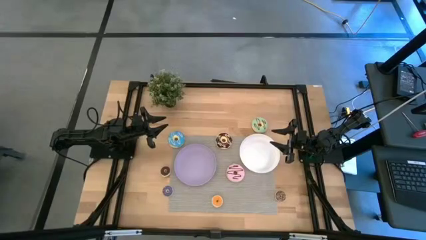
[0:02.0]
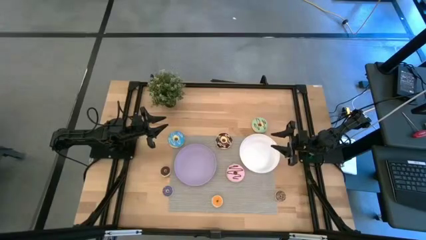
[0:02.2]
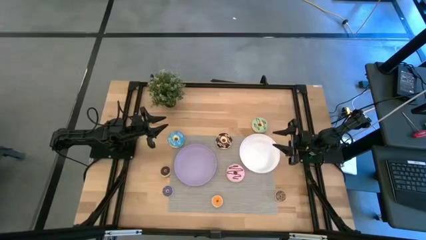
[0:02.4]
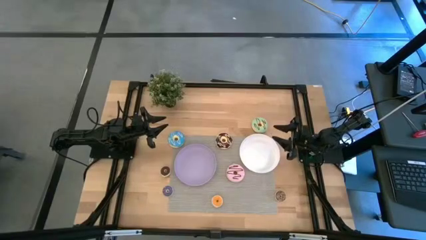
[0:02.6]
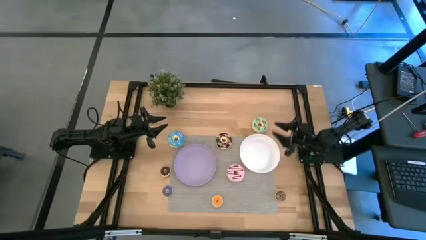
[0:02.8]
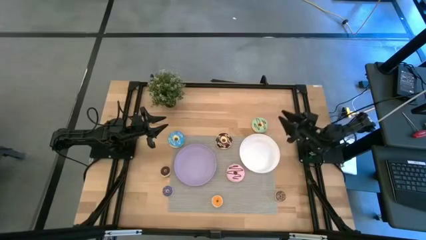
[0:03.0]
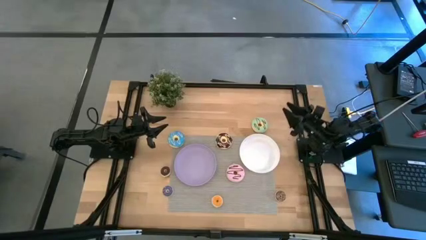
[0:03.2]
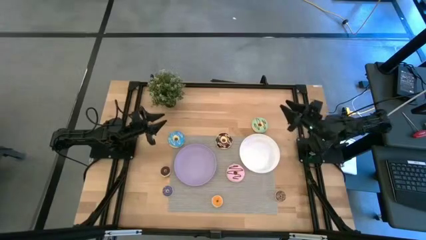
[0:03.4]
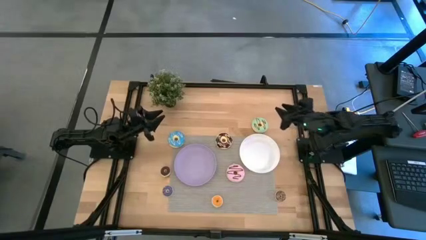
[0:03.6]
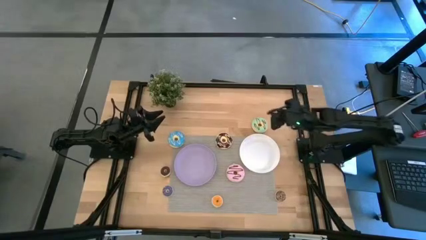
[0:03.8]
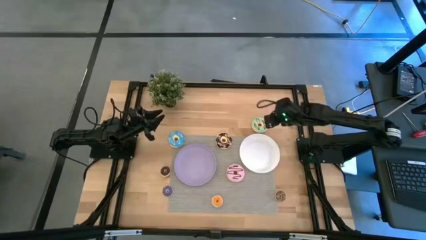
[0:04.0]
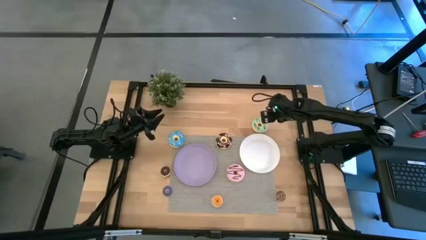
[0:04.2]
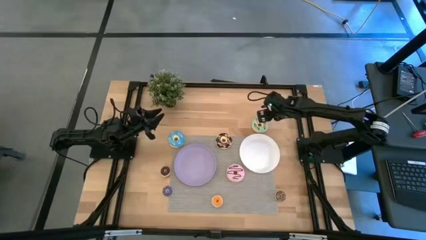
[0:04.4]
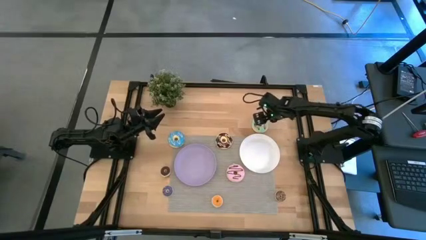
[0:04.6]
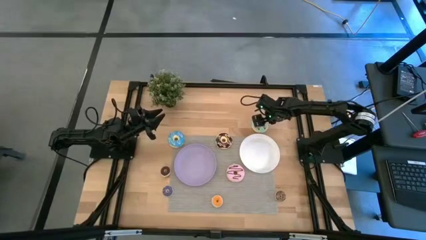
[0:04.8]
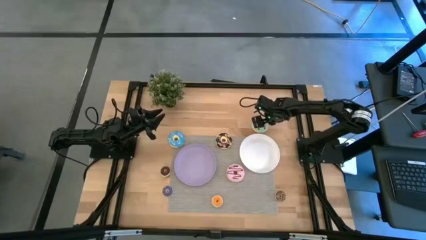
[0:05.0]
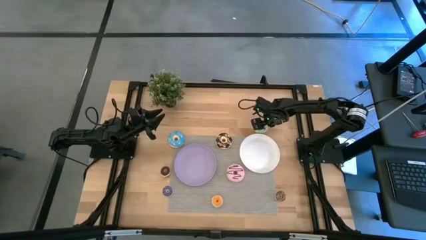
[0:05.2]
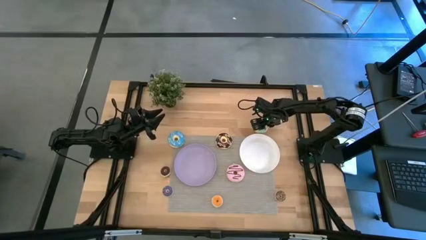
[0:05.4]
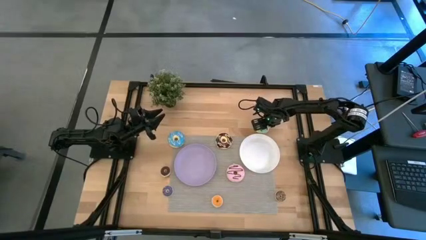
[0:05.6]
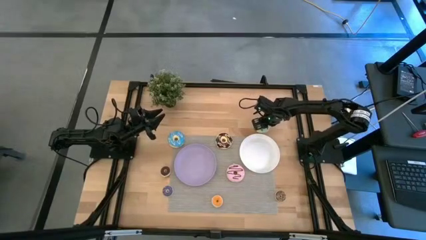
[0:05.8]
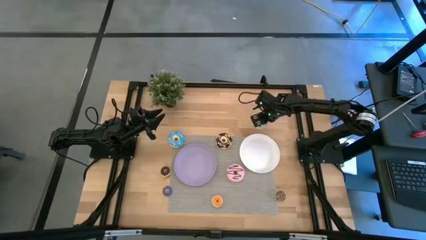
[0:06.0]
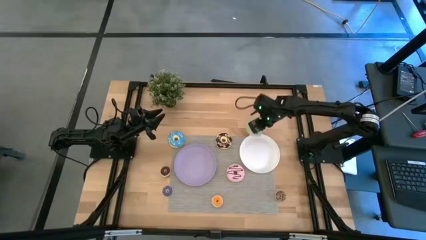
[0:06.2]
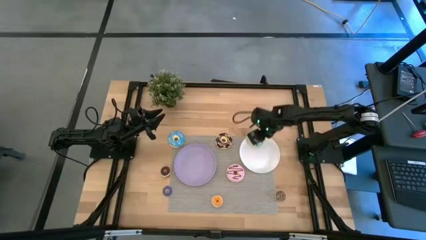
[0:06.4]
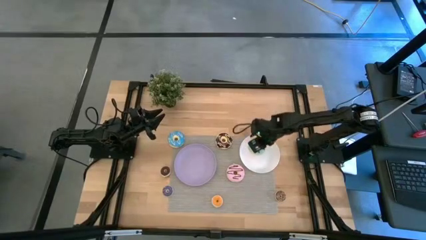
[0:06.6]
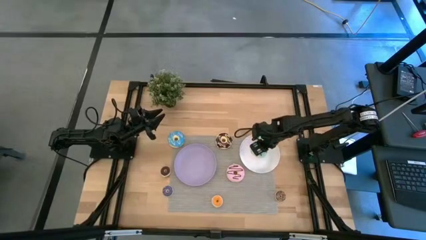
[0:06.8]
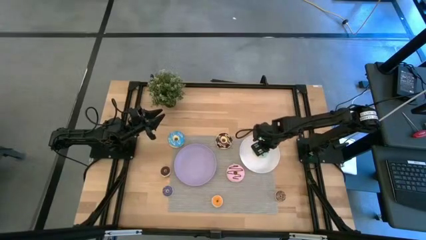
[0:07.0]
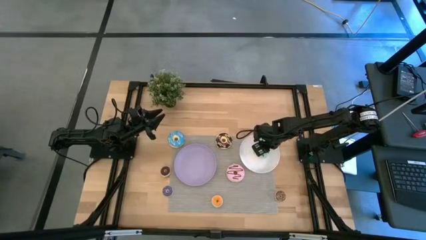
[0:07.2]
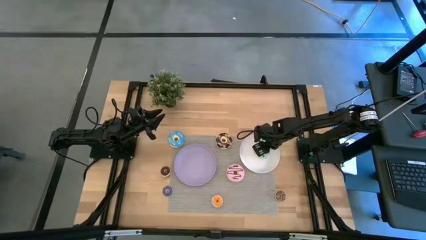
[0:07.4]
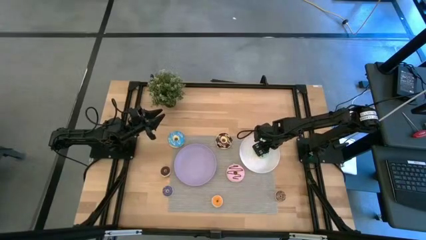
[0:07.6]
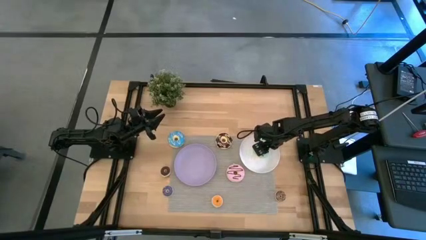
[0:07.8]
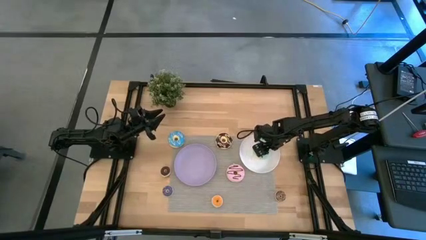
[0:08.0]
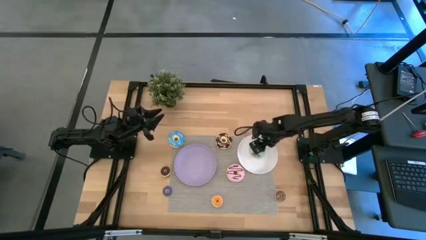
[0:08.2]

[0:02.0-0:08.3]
Task: Pick & Place donuts
Put the large green donut on the white plate

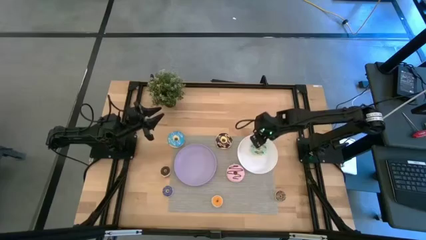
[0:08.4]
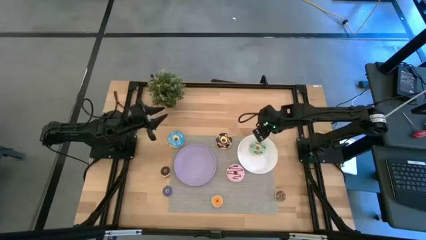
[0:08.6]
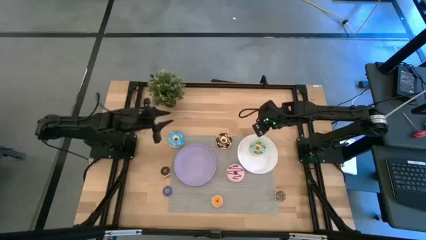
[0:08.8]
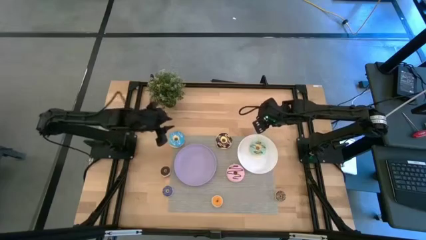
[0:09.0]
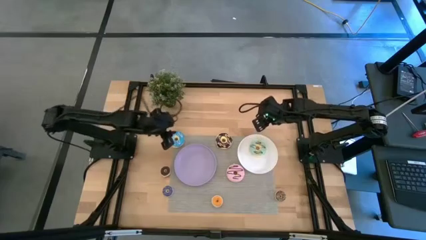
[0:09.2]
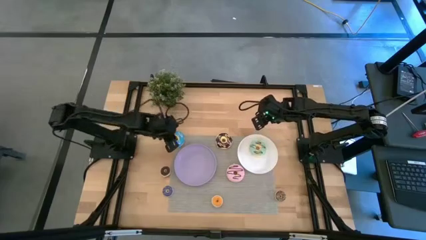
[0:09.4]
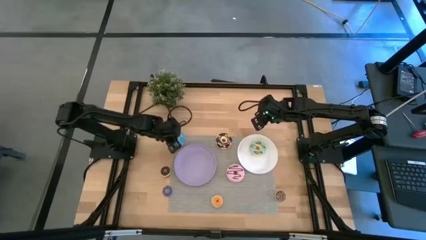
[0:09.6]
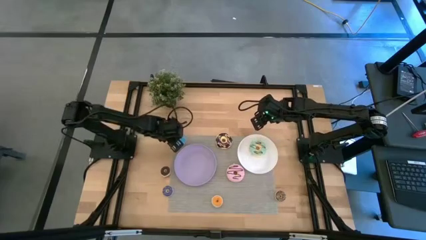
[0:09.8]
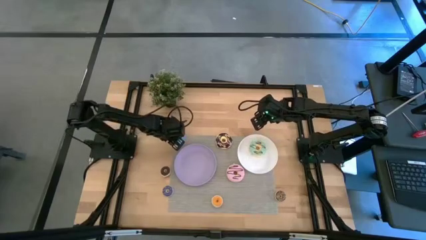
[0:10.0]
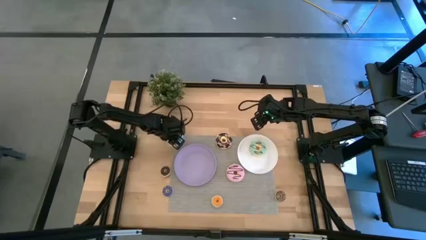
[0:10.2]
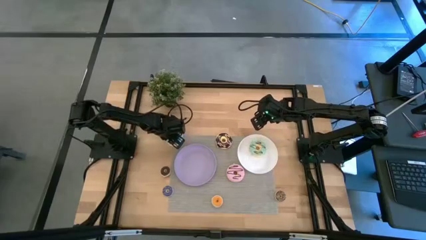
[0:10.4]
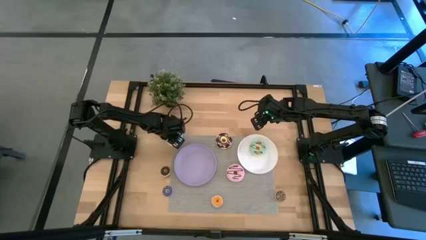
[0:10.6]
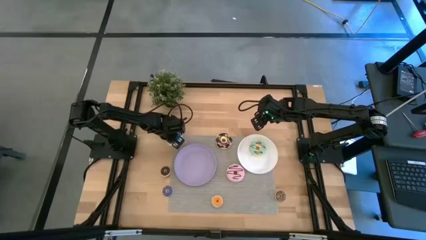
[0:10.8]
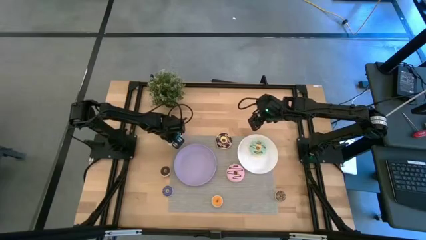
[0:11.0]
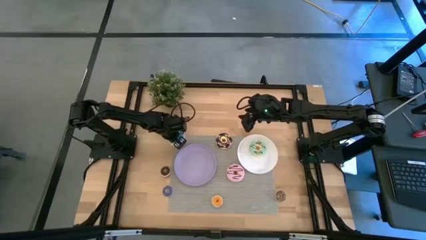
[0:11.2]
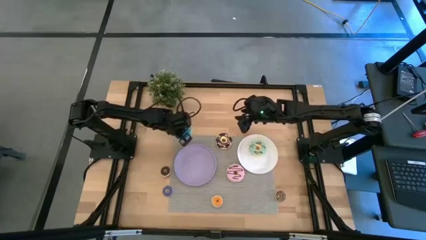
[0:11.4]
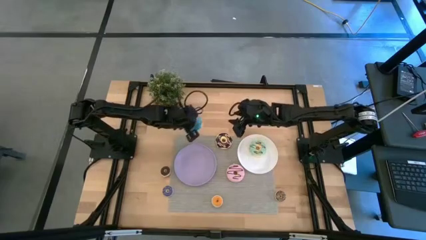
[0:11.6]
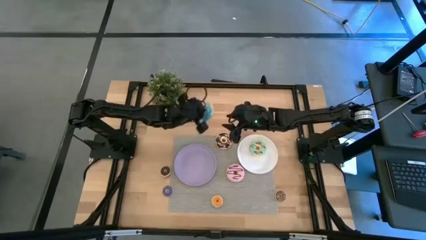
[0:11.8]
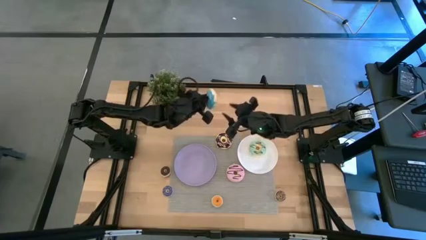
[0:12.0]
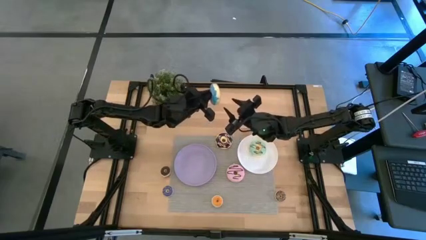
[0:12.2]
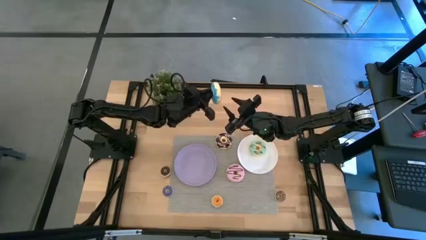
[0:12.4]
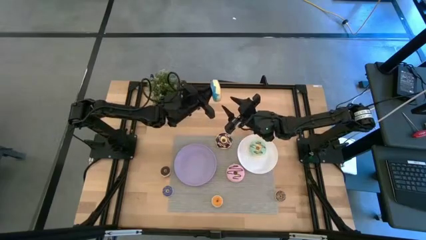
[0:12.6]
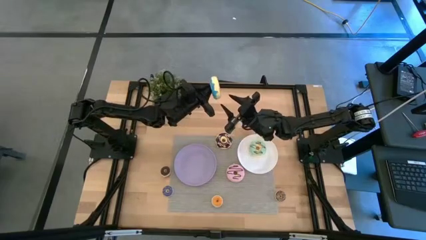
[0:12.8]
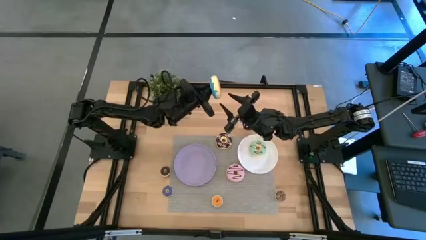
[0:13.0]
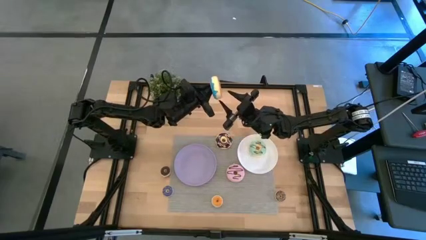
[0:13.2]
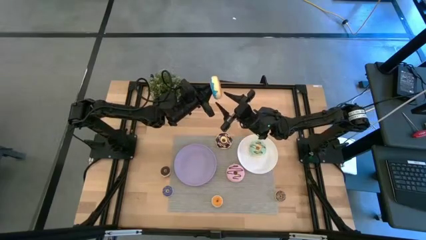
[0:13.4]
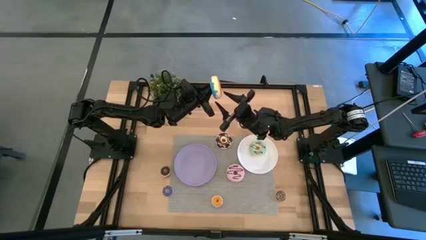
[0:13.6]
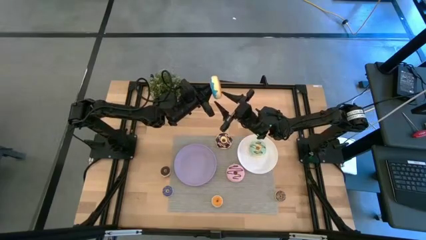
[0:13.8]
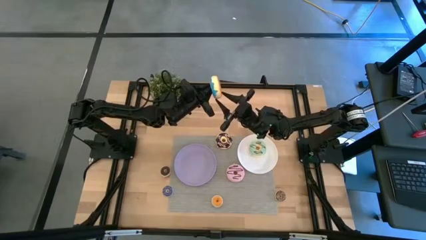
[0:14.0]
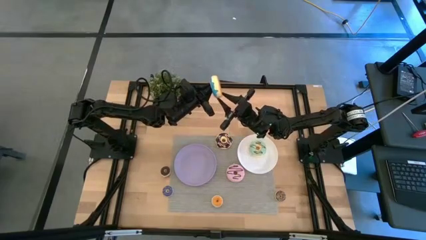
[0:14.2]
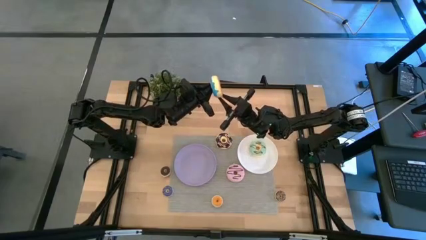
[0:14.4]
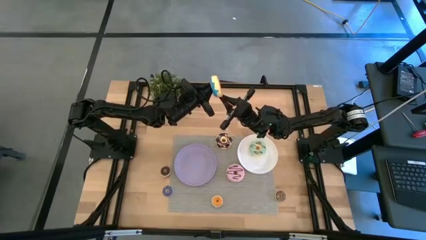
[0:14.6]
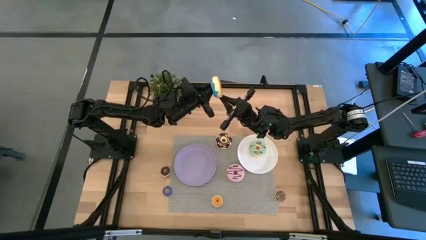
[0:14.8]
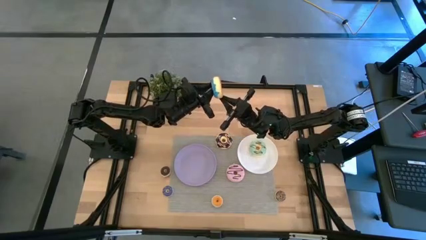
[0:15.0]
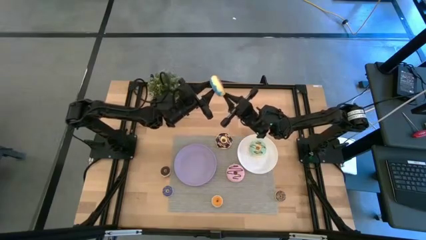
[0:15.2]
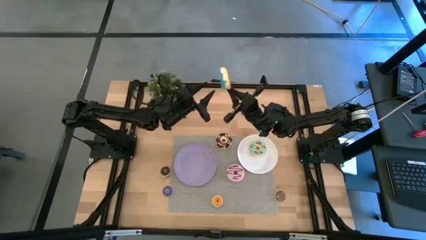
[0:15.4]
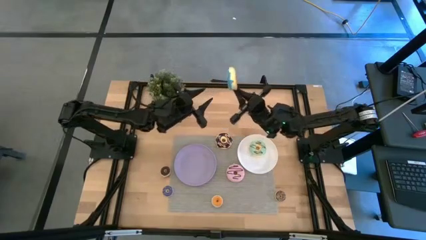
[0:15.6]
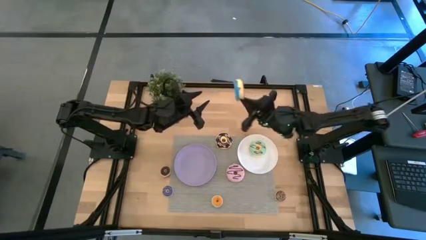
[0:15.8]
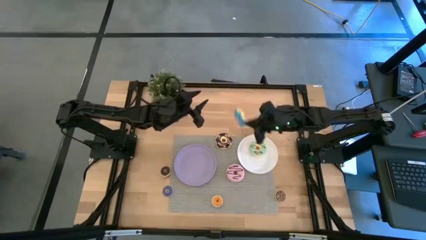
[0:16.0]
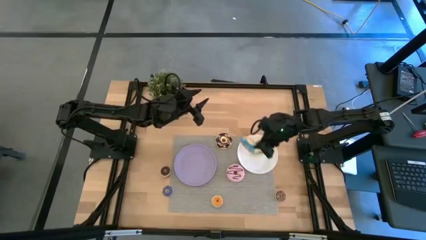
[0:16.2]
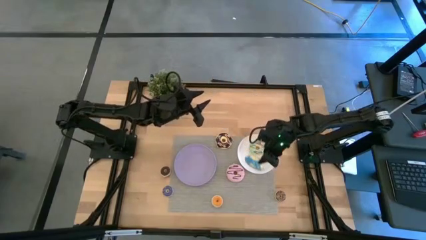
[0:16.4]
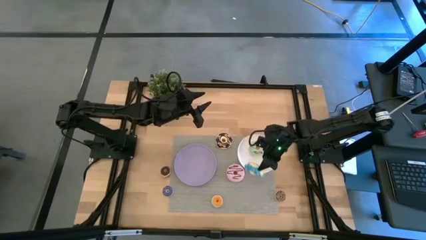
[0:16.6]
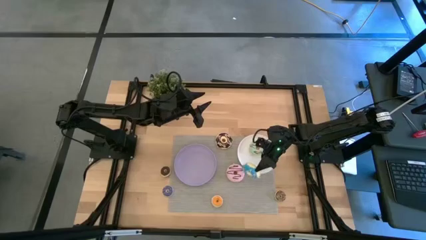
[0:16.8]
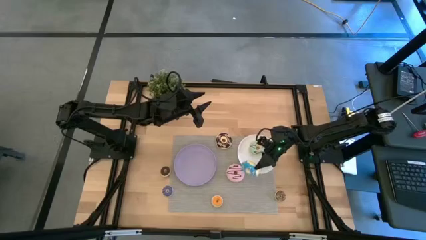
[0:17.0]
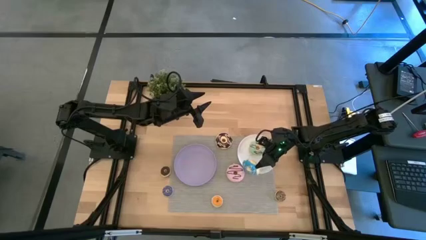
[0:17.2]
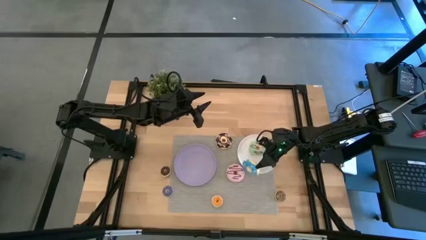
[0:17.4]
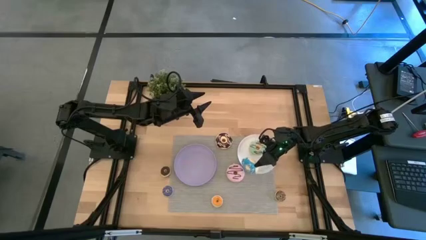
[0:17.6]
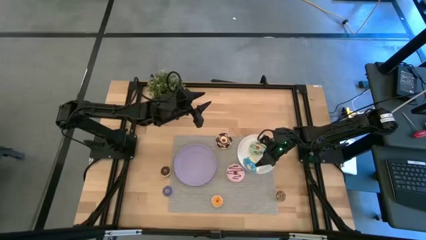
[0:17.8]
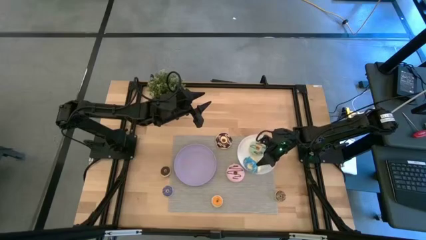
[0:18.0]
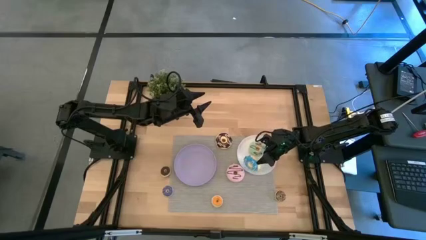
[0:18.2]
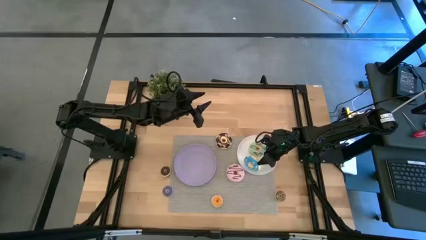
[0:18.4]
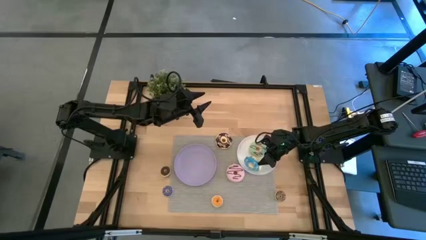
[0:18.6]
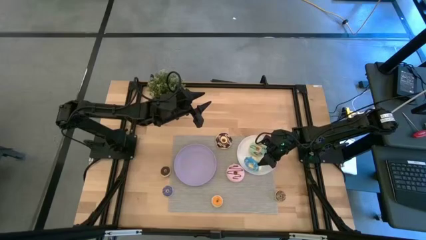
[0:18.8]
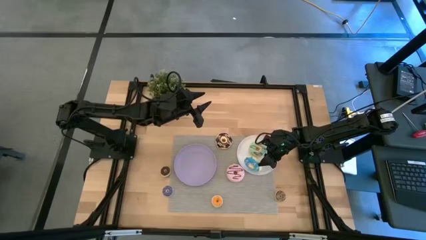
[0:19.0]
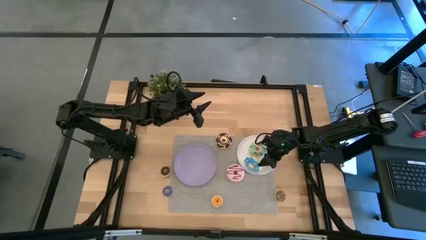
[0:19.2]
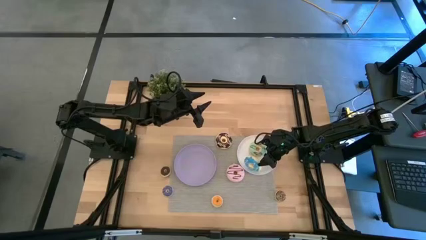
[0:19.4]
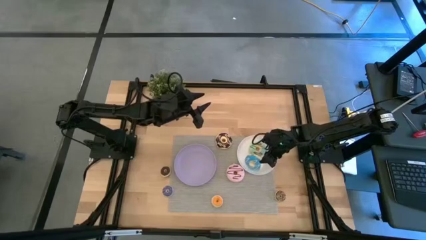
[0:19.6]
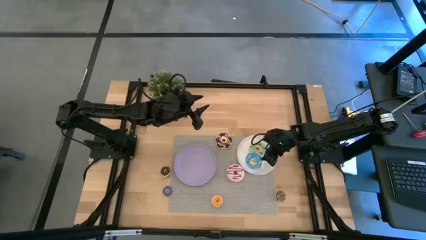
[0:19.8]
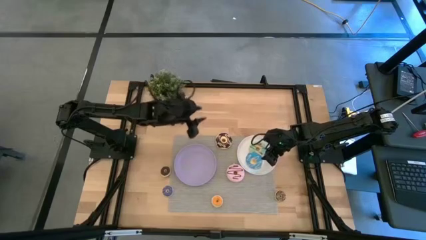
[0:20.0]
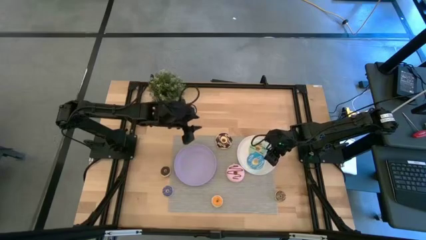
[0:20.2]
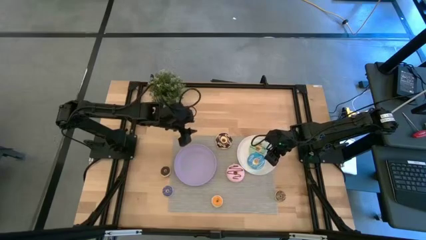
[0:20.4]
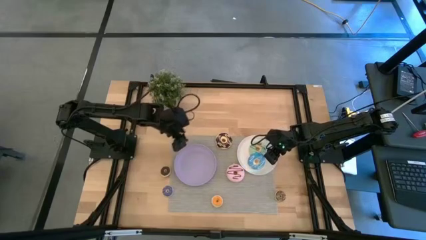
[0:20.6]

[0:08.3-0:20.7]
Put the large blue donut on the white plate
